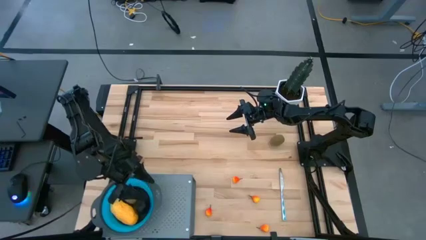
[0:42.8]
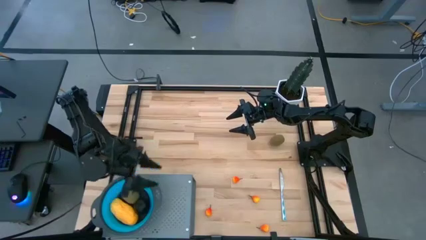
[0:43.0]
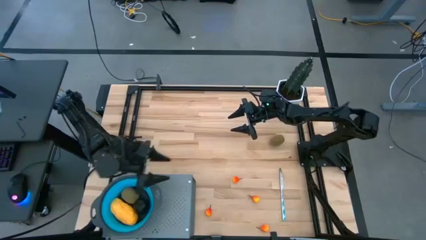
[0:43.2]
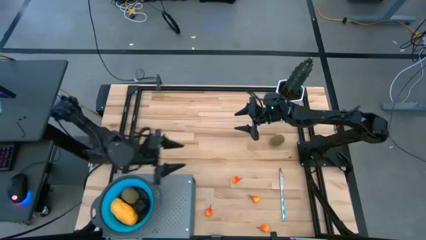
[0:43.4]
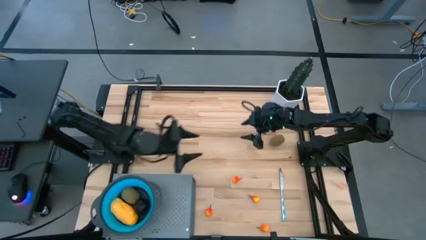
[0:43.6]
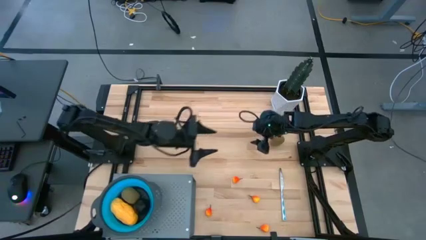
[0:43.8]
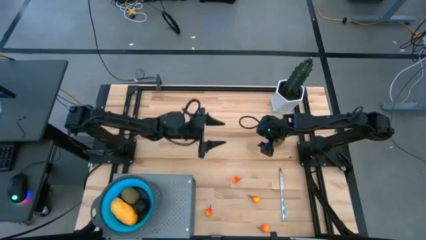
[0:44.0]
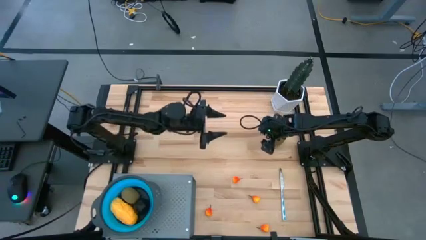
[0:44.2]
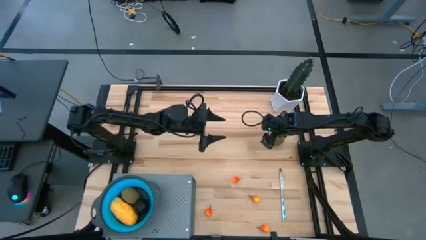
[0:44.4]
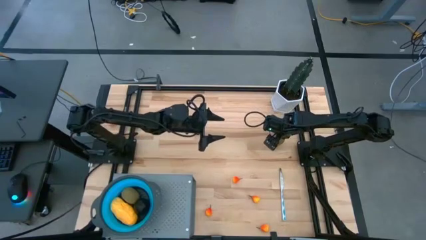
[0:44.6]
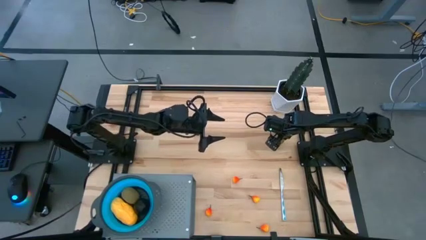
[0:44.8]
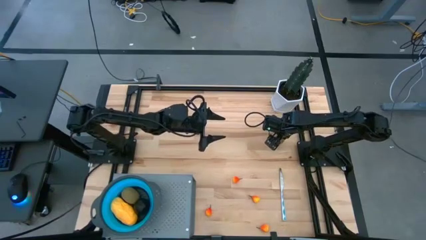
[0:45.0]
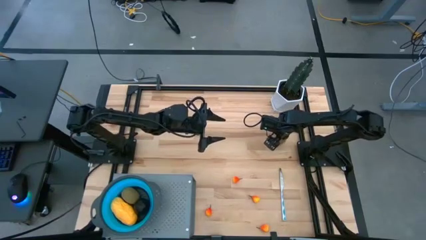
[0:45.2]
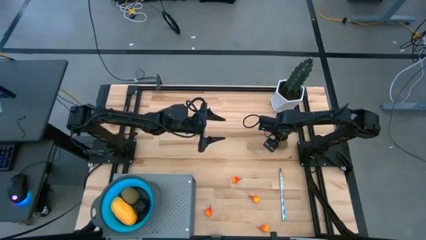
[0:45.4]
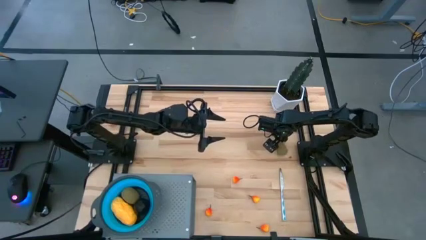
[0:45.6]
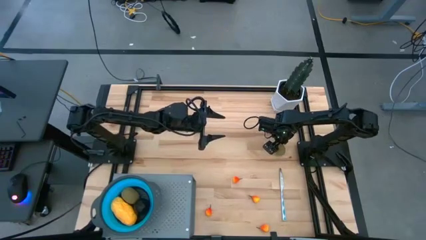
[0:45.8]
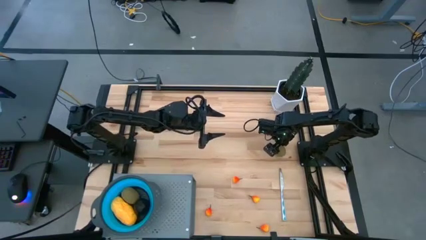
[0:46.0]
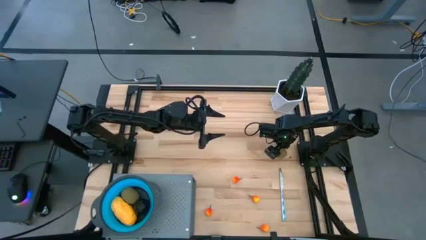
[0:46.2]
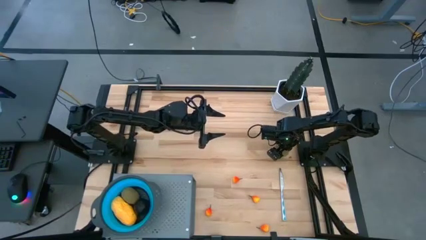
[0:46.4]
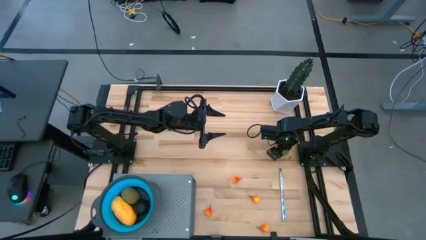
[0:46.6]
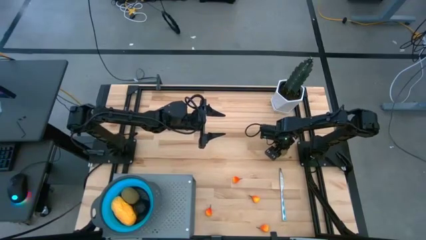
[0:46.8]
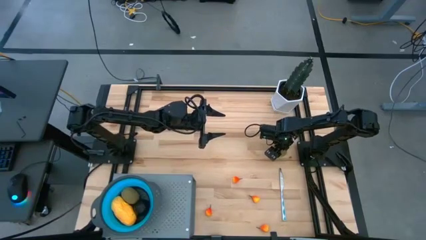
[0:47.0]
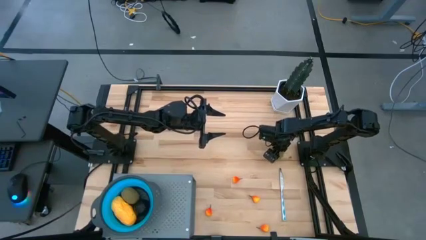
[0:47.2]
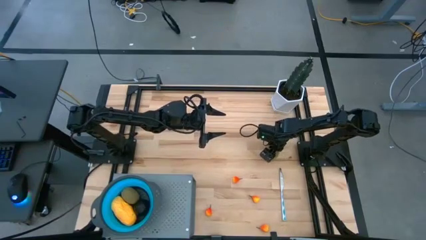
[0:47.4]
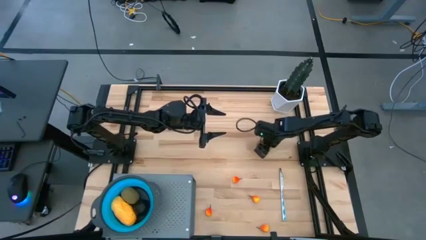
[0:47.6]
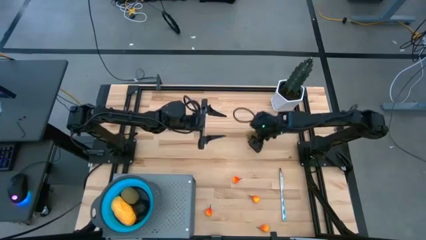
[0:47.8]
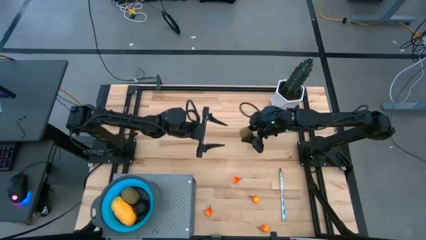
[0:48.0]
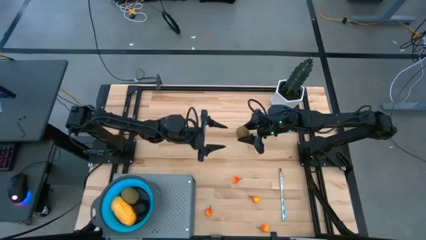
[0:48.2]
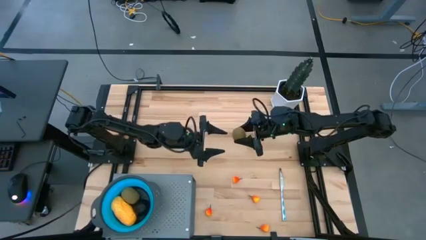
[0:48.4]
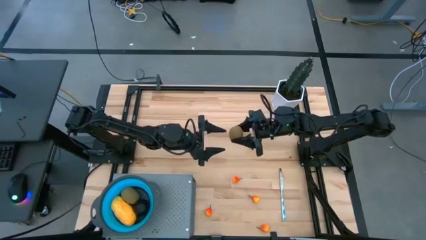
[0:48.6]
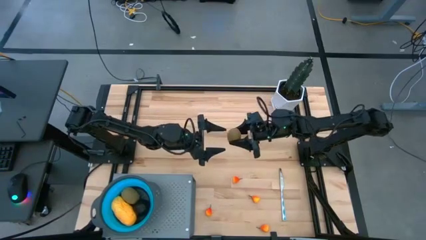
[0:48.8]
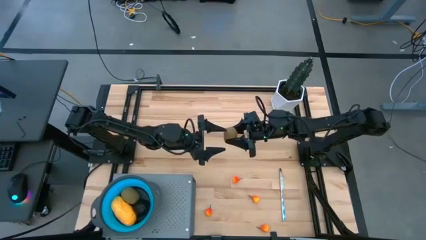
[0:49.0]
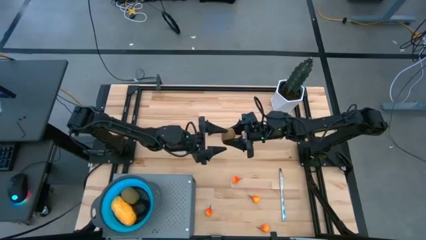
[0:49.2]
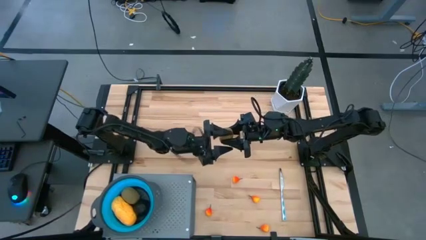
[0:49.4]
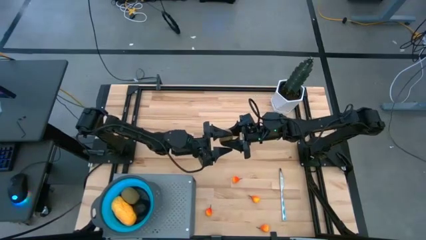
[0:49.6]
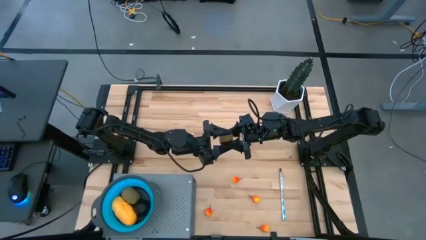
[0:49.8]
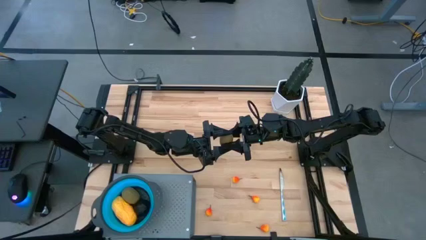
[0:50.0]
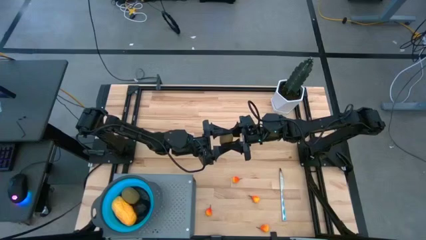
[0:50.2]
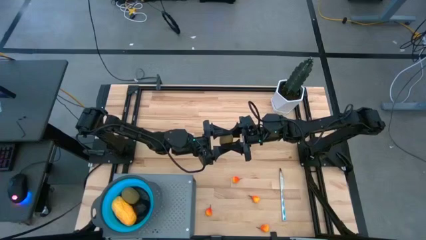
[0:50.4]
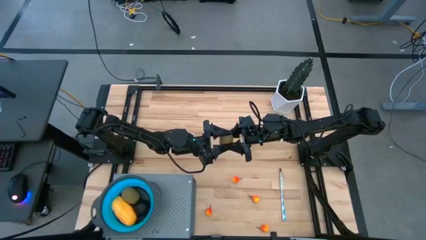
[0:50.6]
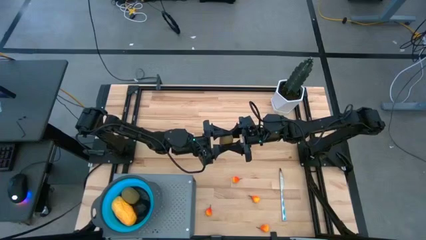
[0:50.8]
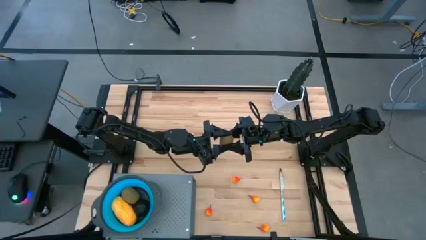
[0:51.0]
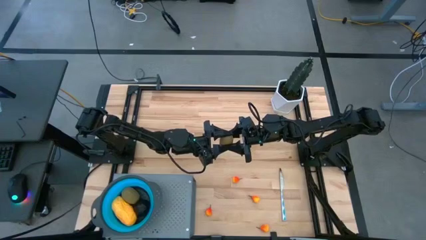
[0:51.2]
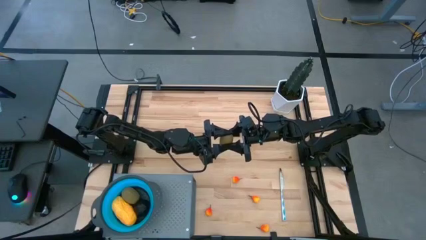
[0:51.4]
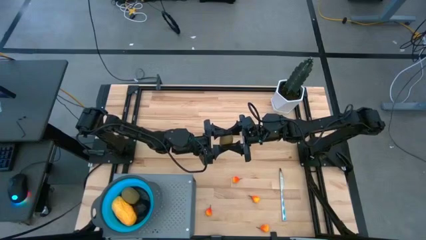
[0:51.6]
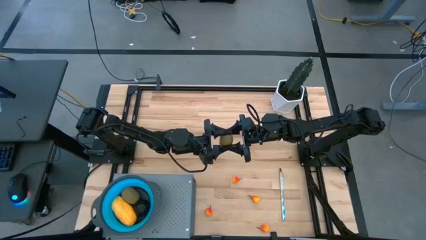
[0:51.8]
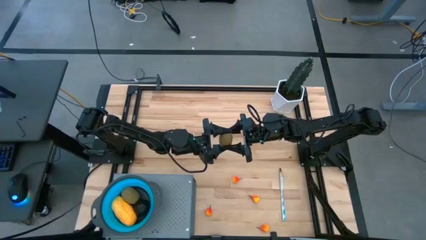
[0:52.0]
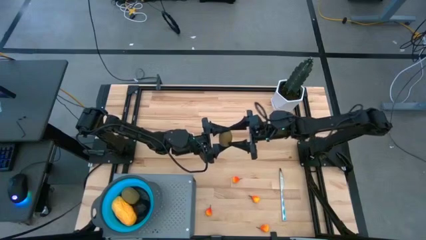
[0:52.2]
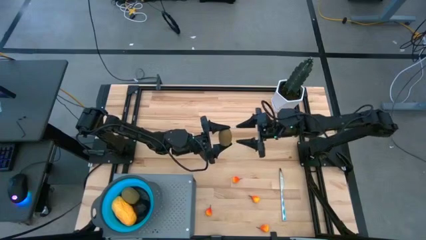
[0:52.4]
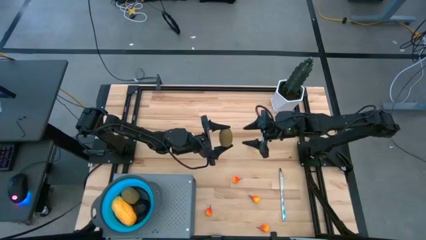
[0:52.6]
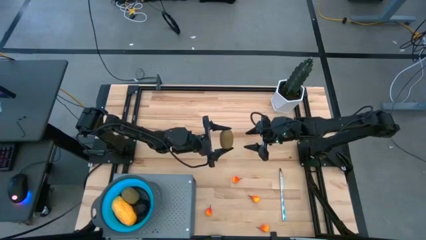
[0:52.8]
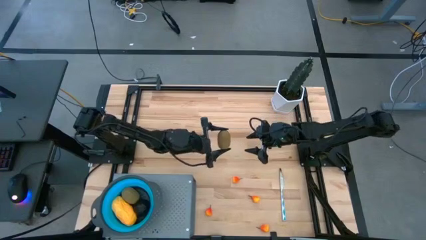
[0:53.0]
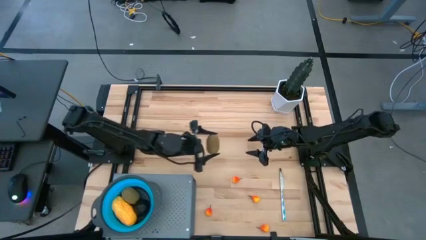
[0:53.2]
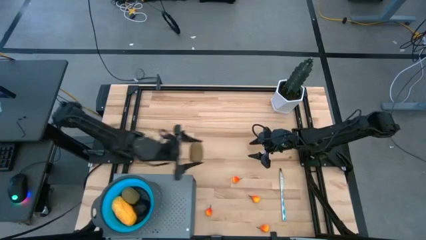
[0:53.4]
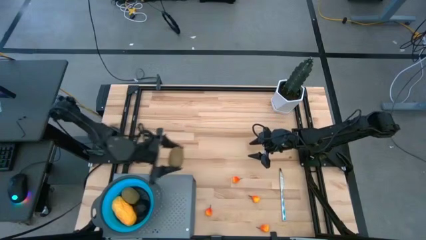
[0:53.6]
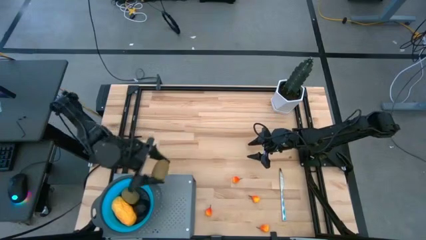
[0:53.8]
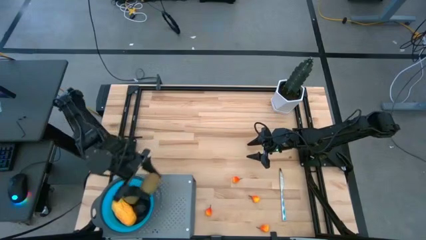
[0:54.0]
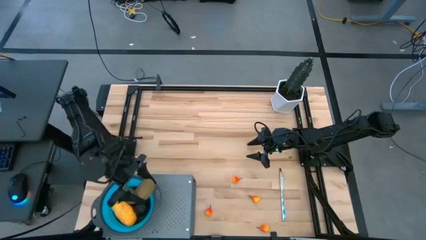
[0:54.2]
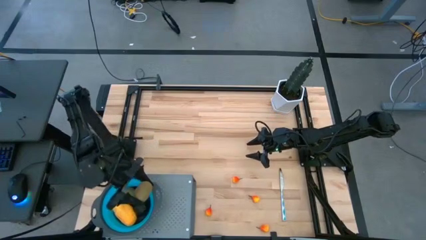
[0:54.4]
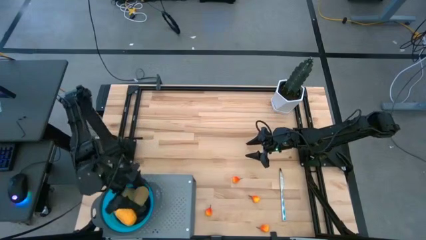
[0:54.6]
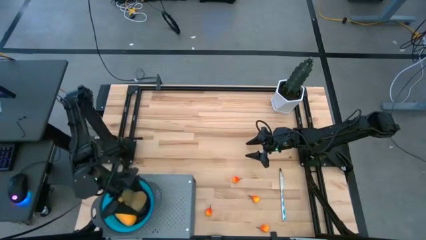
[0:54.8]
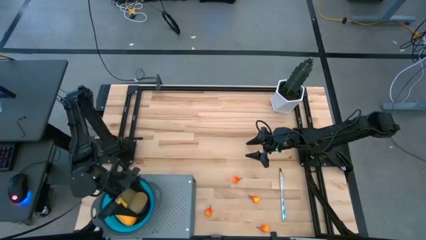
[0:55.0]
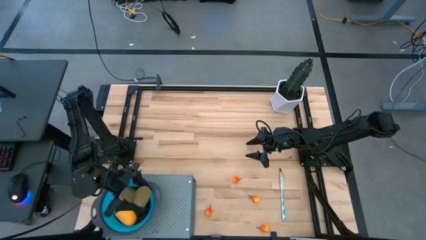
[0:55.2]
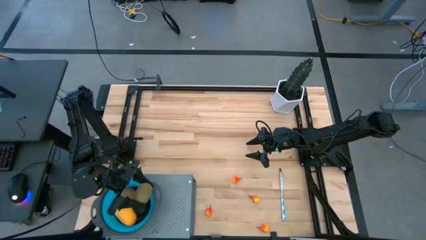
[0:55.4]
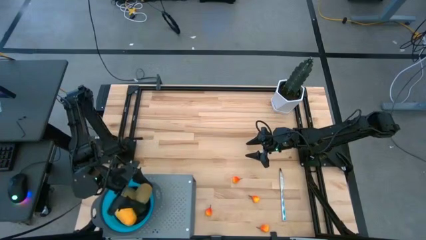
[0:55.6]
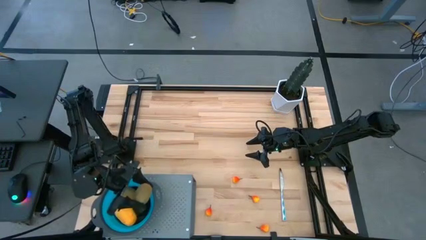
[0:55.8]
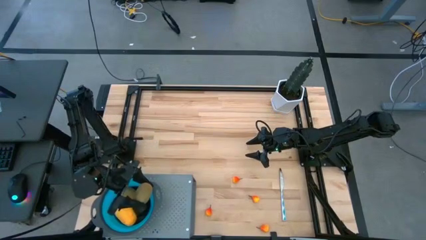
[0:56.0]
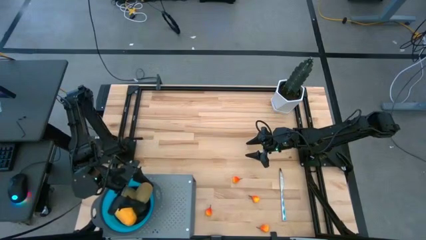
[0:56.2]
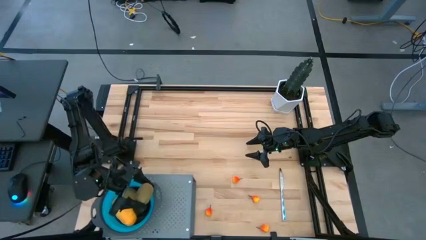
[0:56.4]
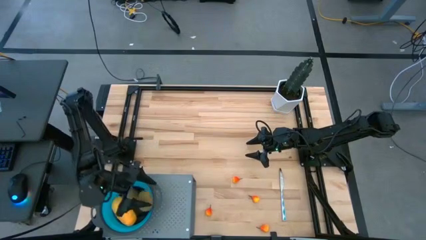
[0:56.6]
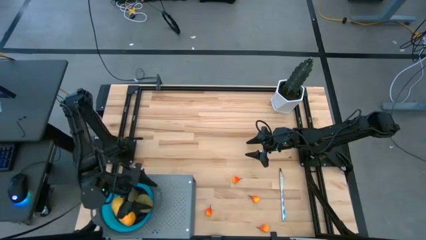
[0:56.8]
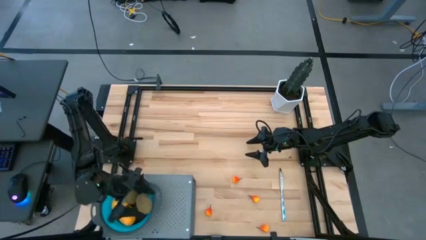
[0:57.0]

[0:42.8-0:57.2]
Task: Pick & Place Fruit
Put the kiwi into the strainer bowl

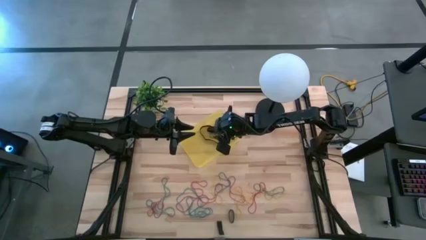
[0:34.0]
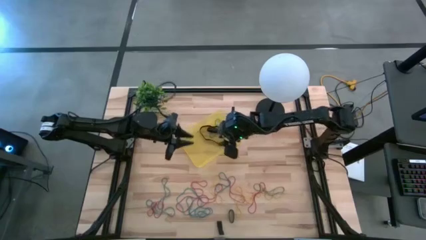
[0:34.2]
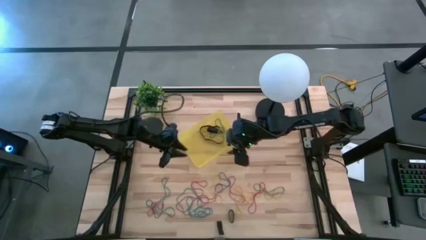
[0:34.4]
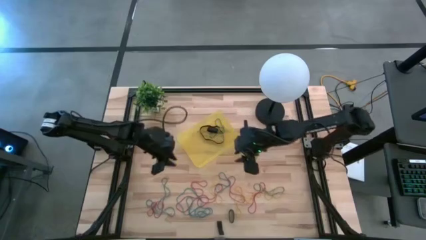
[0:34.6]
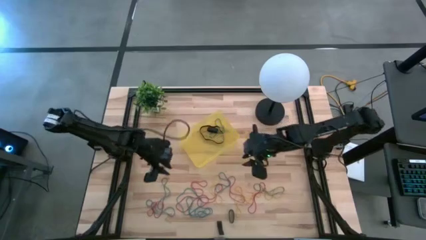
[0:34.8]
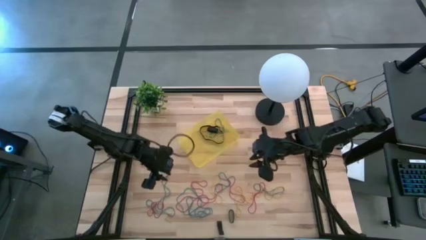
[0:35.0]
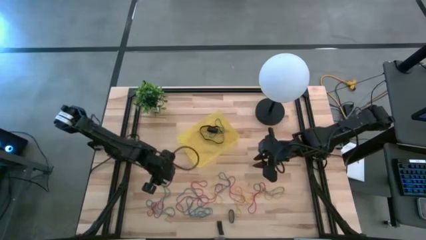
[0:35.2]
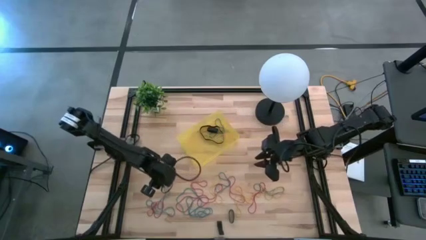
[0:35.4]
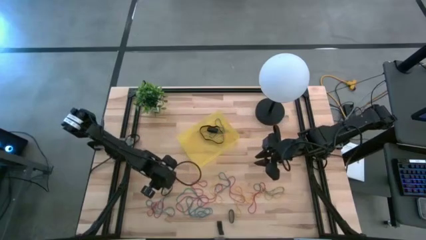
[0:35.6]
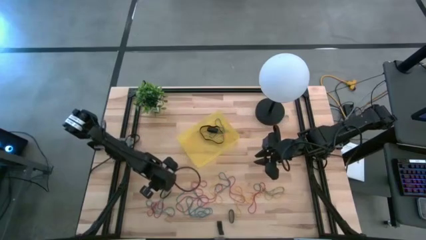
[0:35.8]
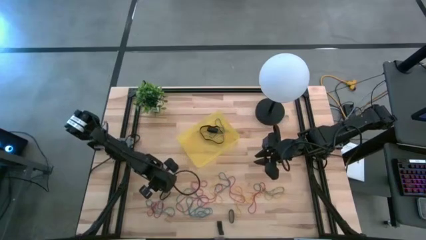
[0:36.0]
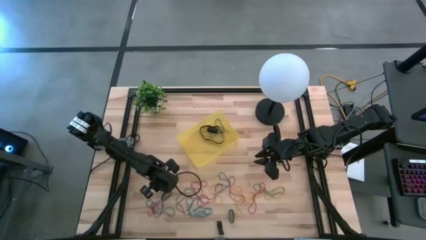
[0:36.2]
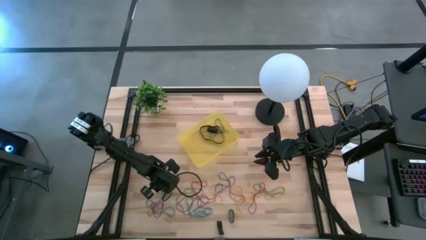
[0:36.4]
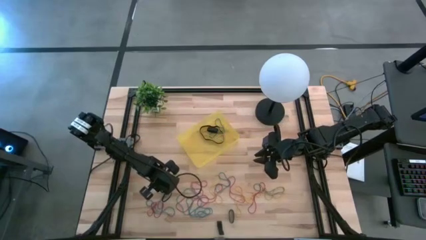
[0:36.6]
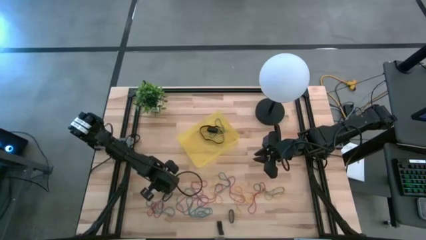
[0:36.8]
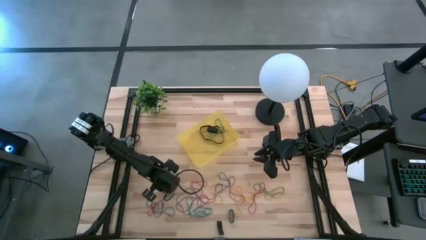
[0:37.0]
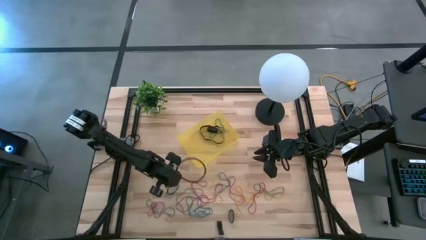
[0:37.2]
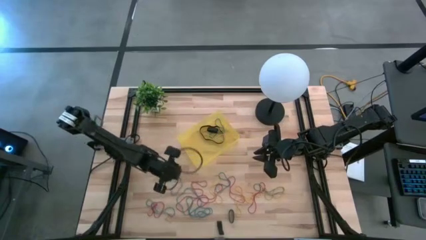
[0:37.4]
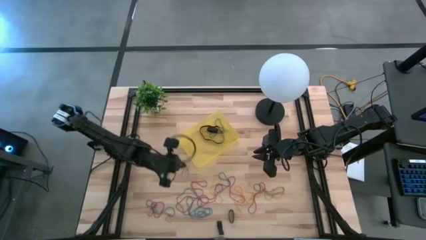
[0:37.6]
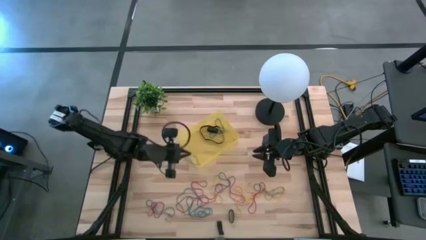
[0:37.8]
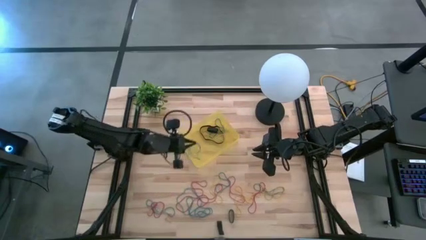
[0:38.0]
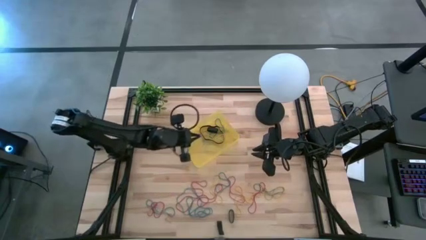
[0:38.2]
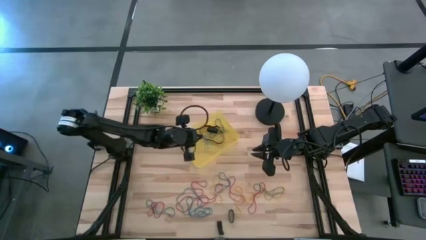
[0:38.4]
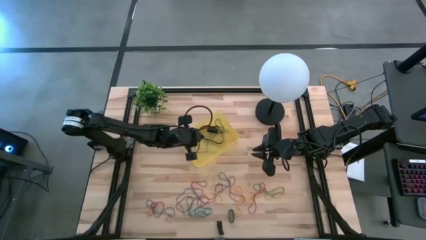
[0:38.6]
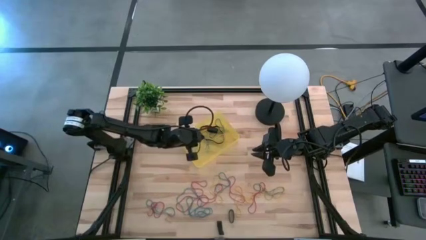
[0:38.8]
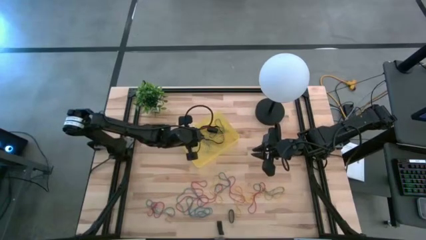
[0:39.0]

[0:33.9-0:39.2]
Task: Pick and place rubber bands into bin
Put the blue rubber band into the yellow bin
